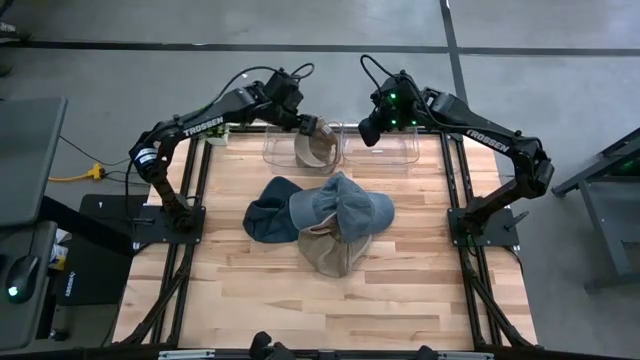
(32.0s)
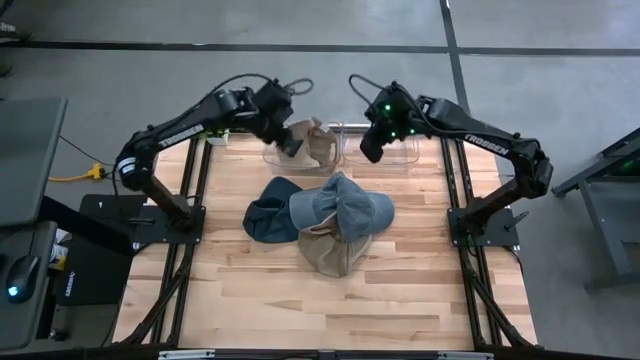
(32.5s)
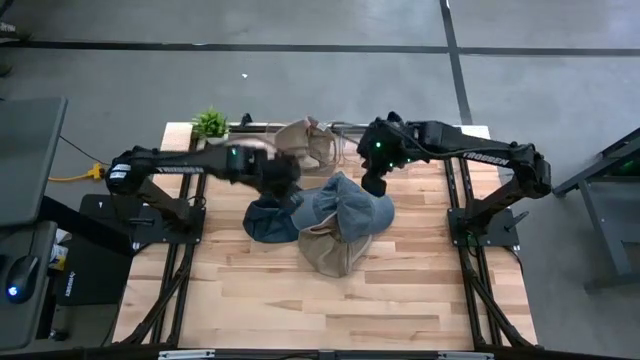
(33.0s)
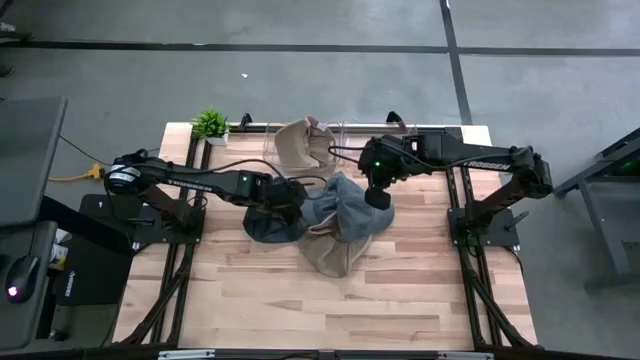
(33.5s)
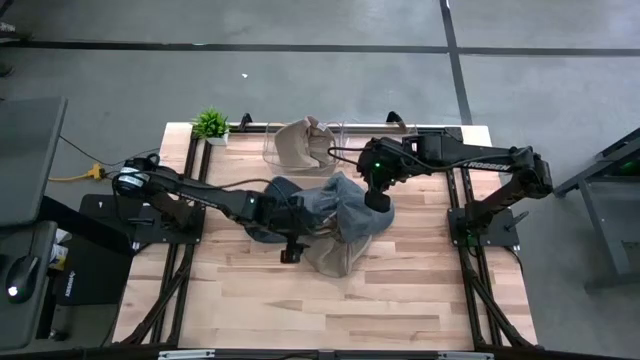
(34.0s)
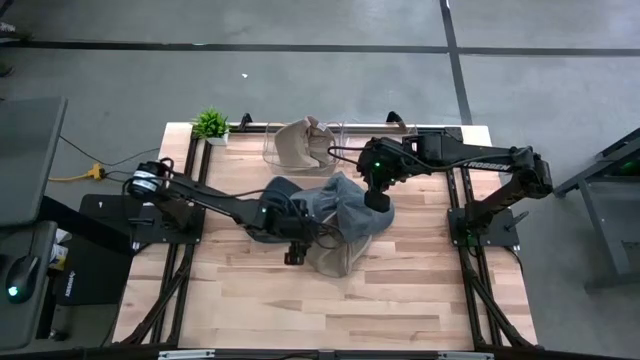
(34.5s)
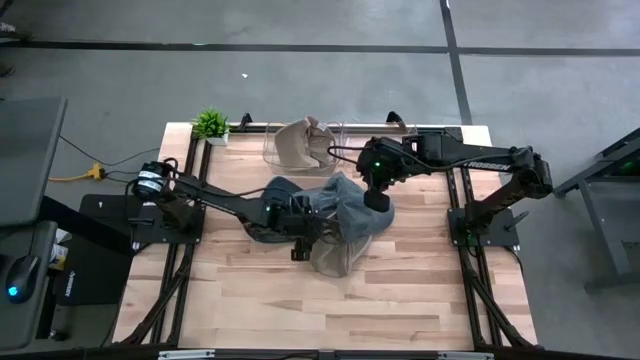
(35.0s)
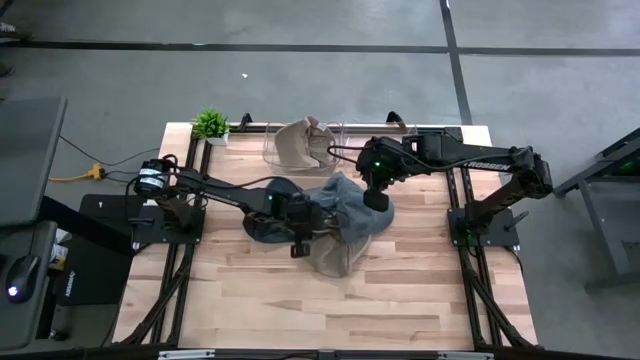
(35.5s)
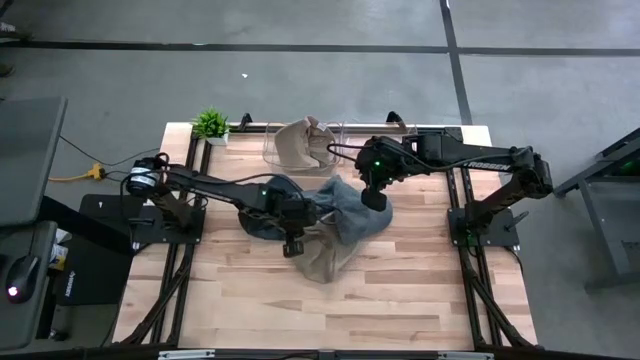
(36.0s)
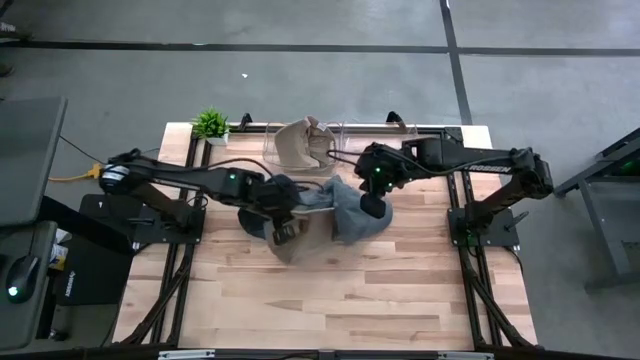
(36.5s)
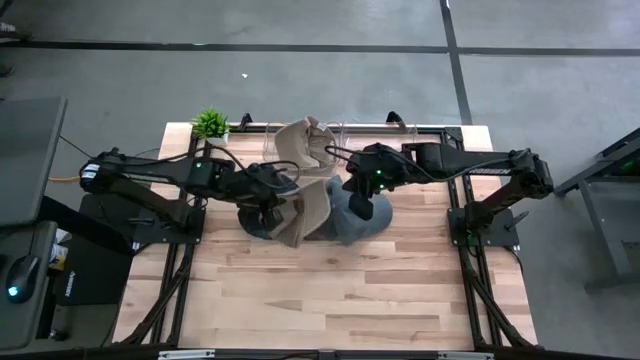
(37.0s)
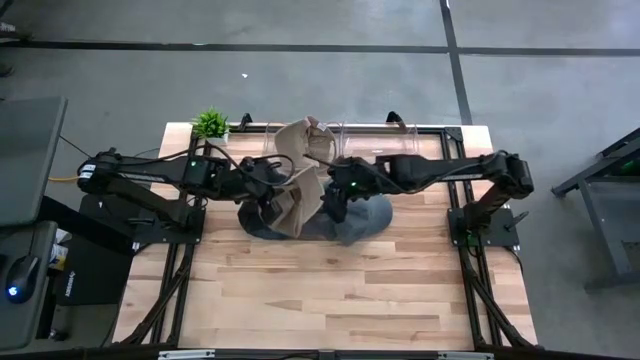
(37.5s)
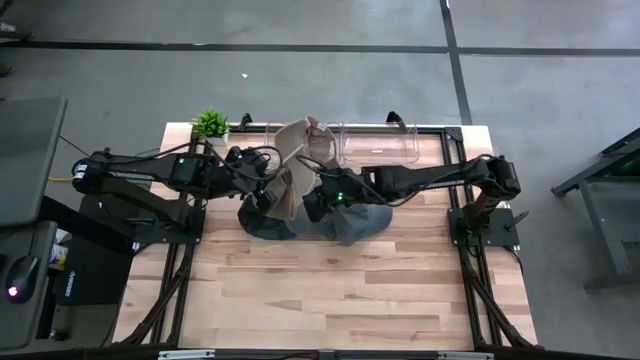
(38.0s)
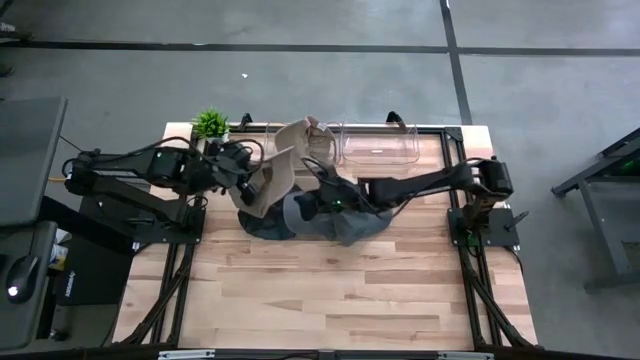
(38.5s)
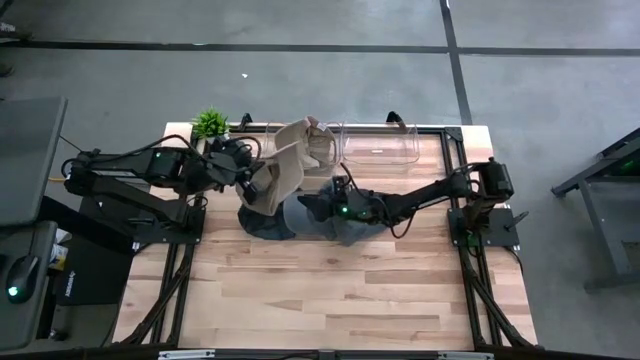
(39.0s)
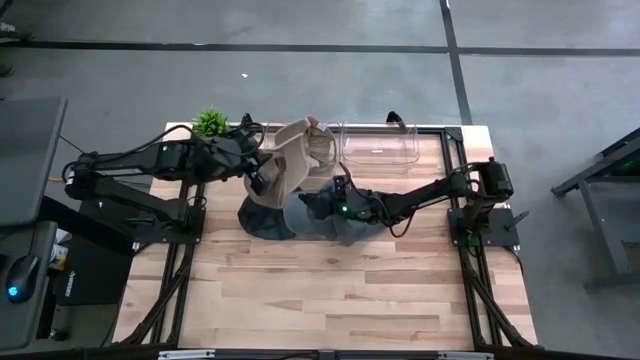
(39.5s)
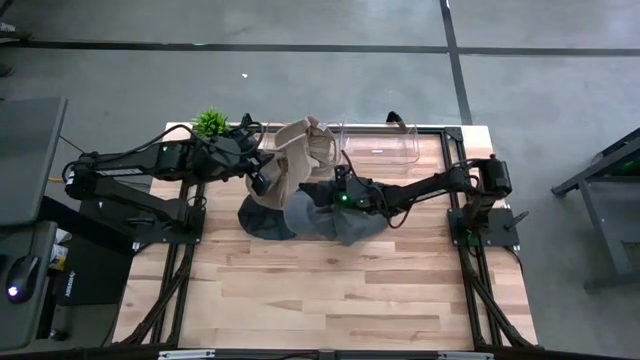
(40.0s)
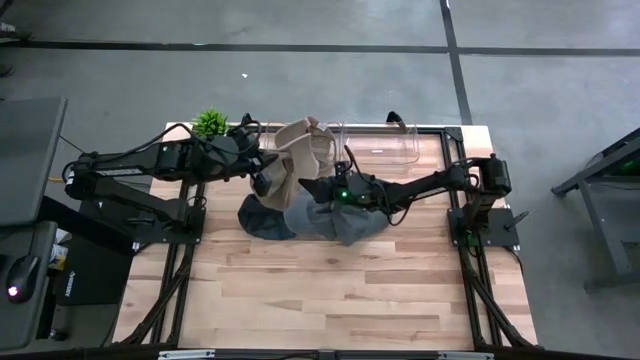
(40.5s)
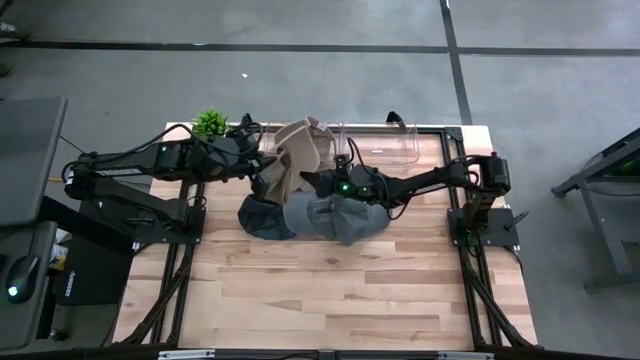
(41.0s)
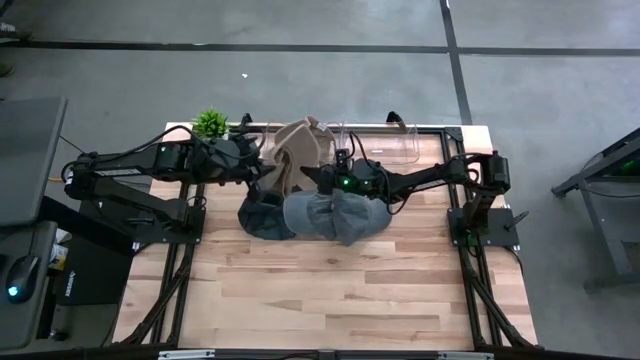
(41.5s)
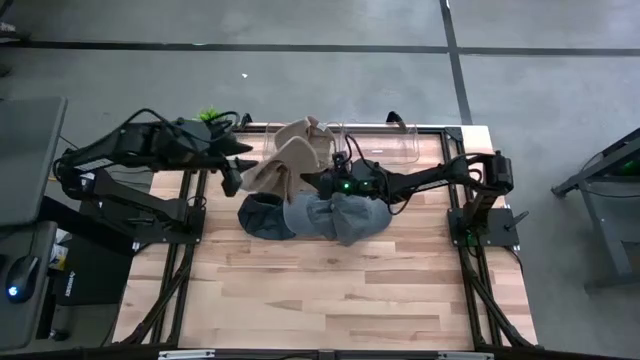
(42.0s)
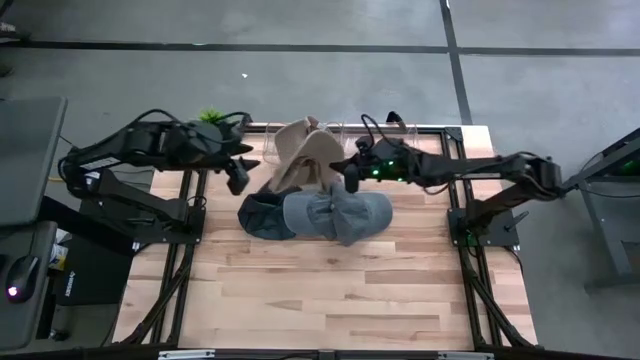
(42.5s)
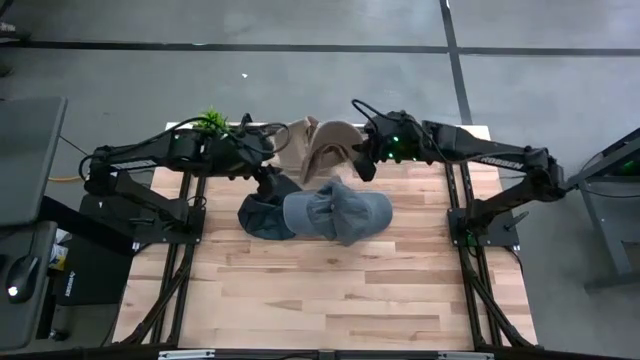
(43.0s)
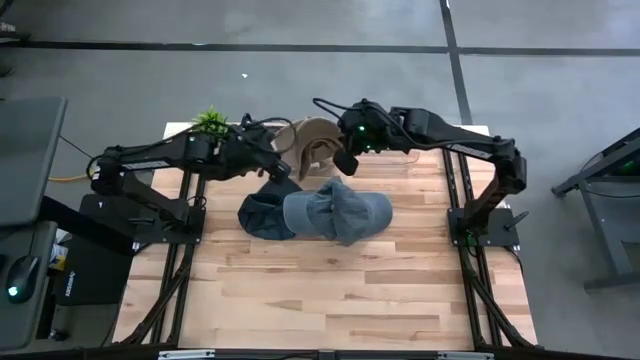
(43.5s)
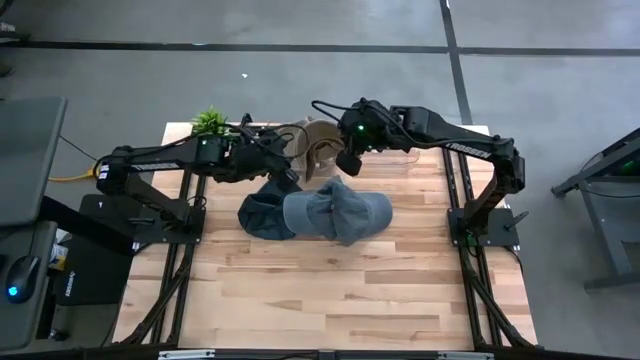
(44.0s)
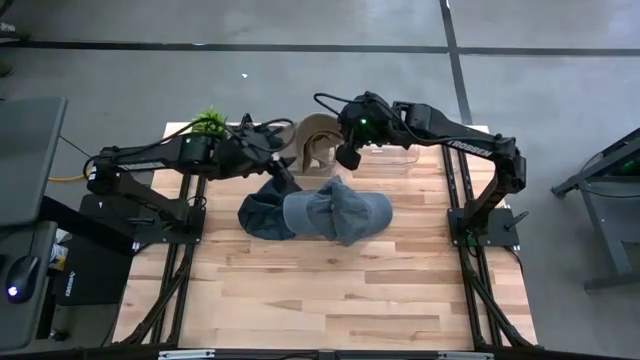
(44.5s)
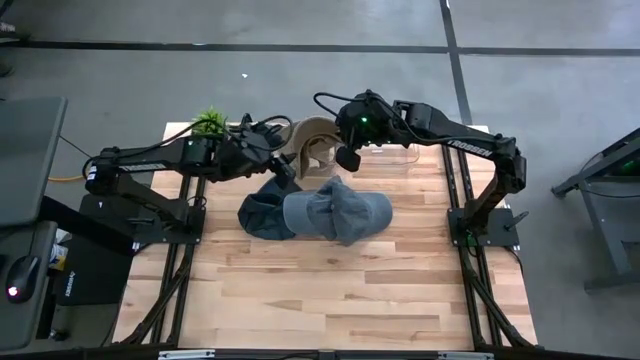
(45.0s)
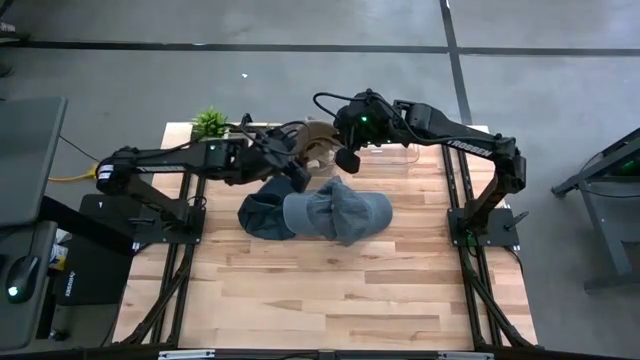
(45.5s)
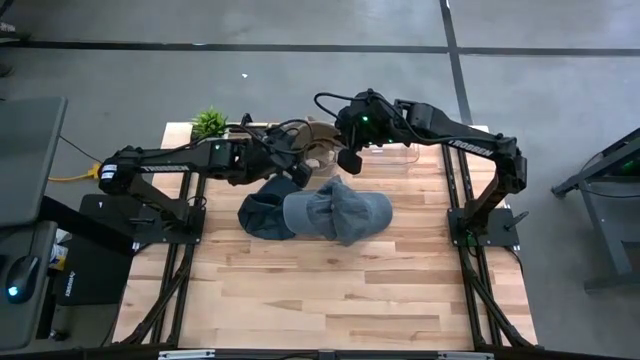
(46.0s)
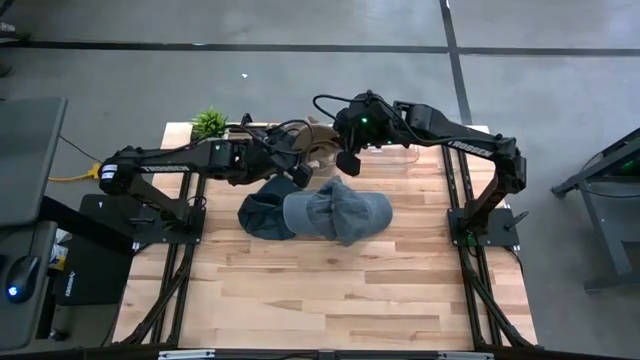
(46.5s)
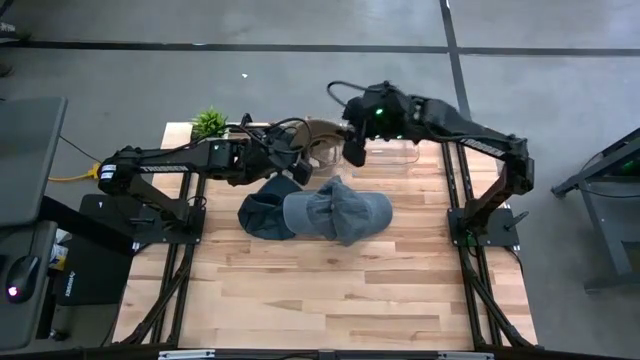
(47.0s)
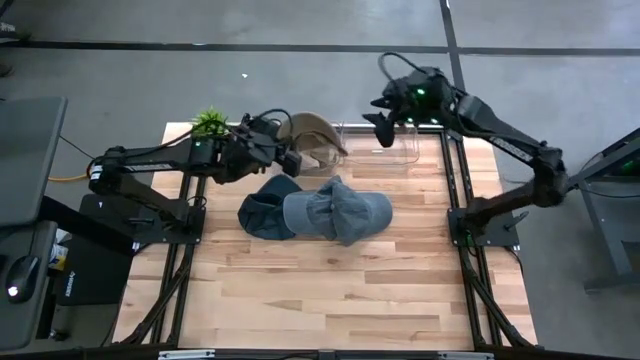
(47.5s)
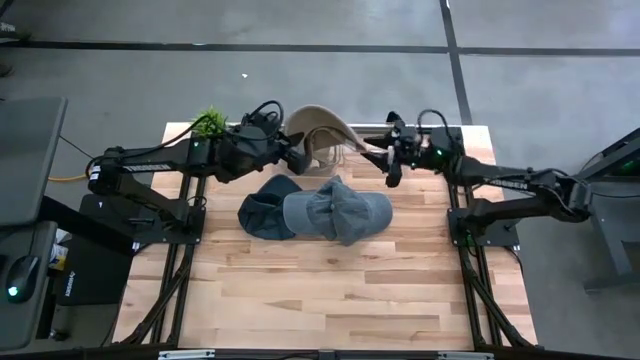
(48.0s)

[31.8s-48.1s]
Task: Pick & Place hat
Put the brown cap into the left transparent bin

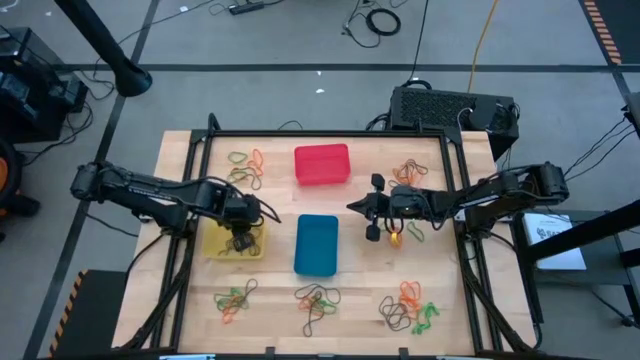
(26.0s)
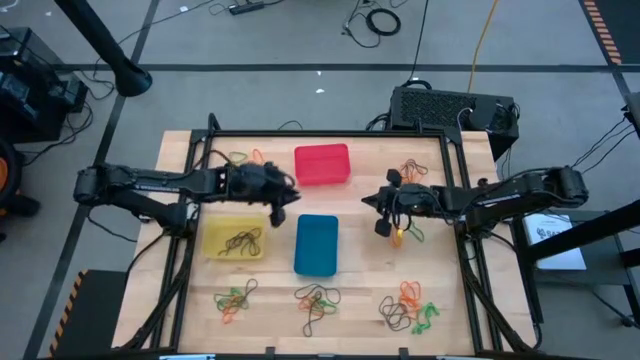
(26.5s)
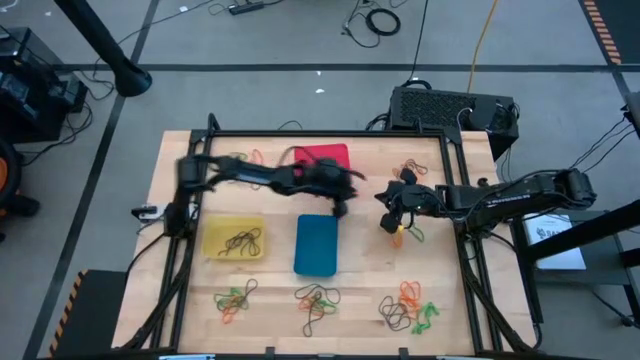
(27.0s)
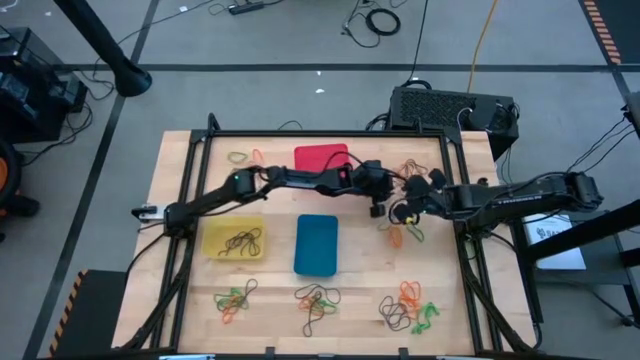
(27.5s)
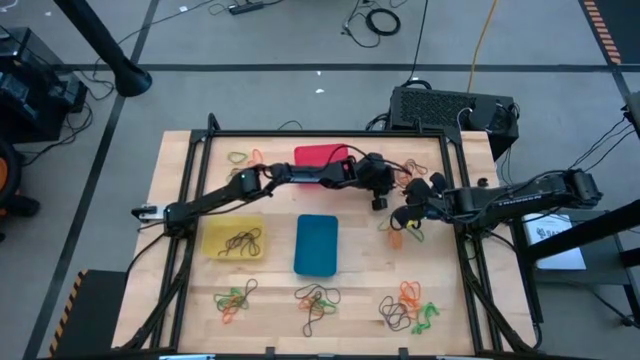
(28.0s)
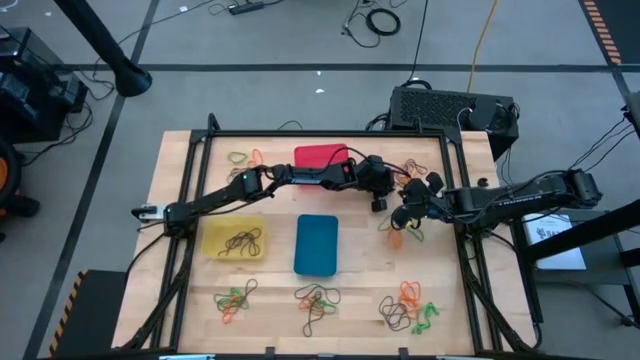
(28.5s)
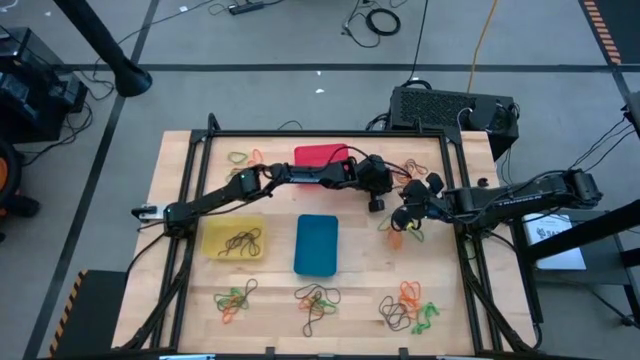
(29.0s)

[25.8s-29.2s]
Task: Sort rubber bands into baskets
Put the purple rubber band into the yellow bin
